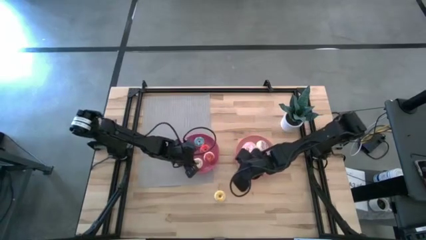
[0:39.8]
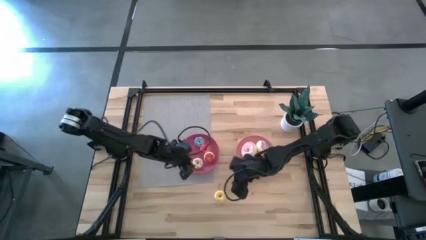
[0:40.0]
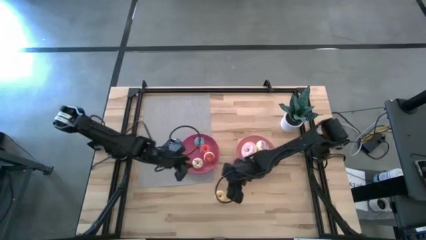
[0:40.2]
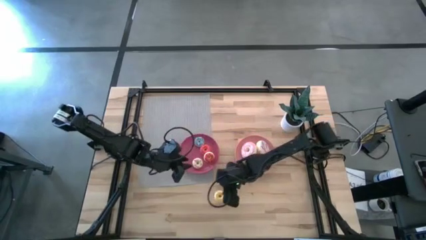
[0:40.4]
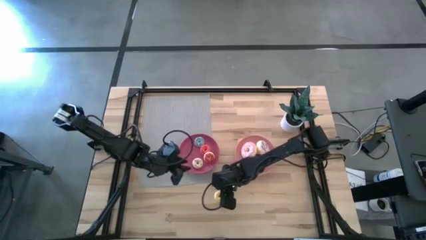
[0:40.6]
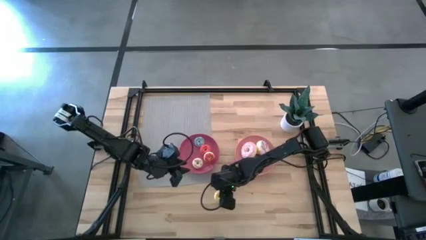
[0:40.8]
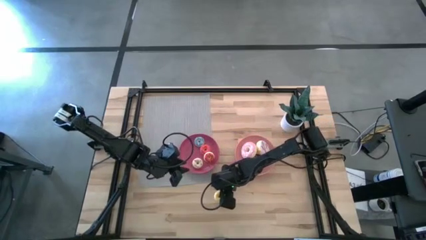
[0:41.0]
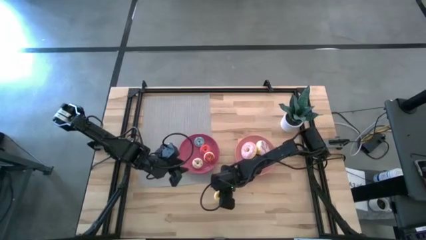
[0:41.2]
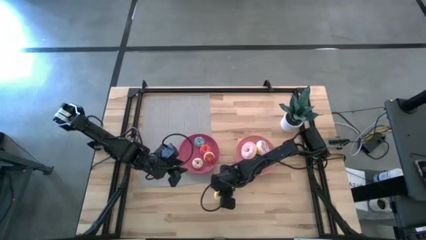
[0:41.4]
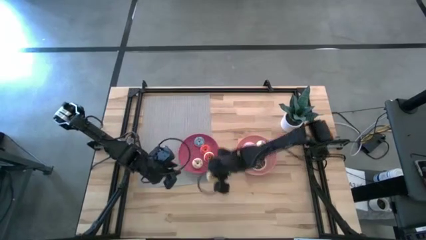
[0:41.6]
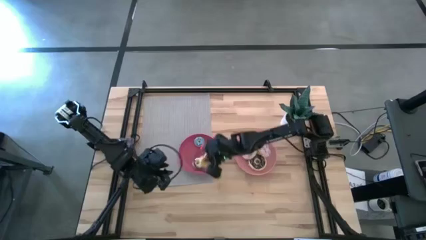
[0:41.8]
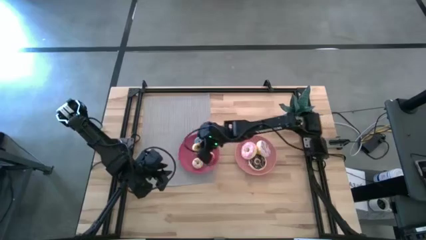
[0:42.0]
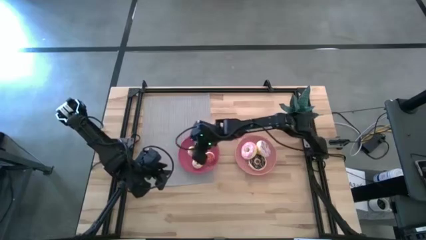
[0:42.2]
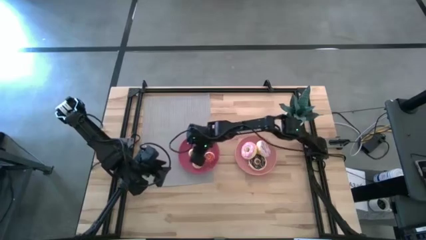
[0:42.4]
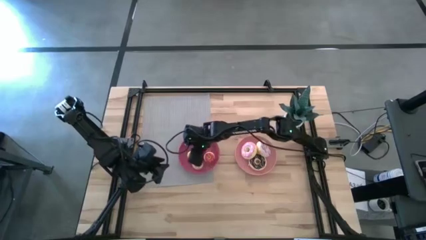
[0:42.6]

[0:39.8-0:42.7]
Task: Pick & Place donuts
Put the small yellow doughnut into the pink plate

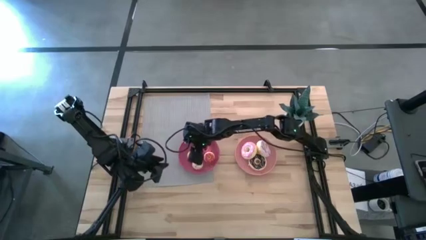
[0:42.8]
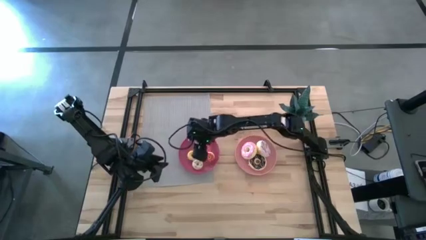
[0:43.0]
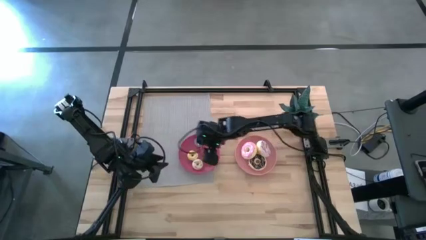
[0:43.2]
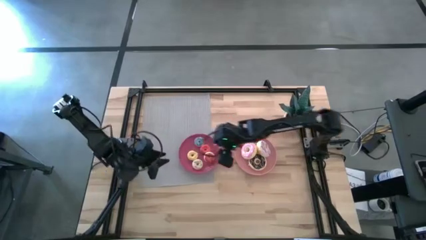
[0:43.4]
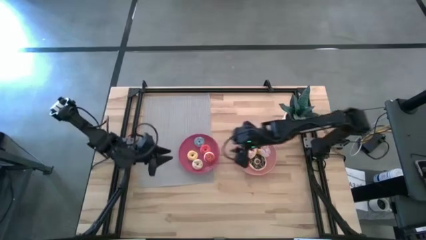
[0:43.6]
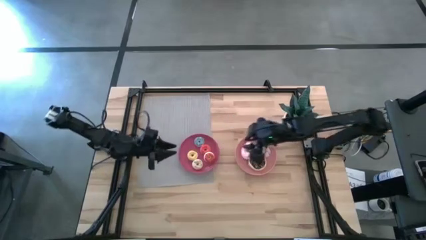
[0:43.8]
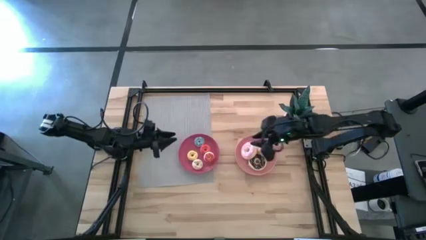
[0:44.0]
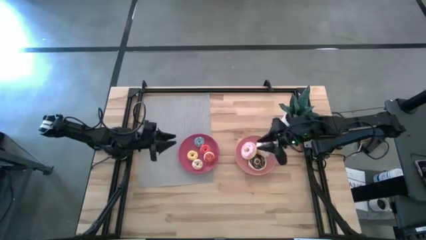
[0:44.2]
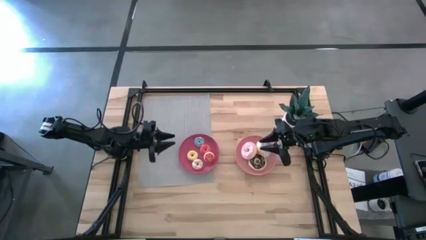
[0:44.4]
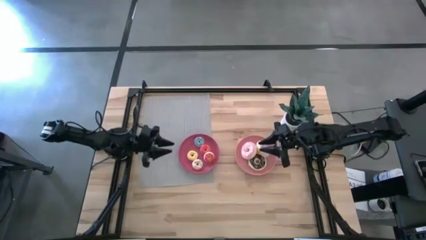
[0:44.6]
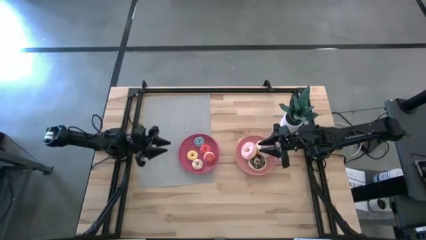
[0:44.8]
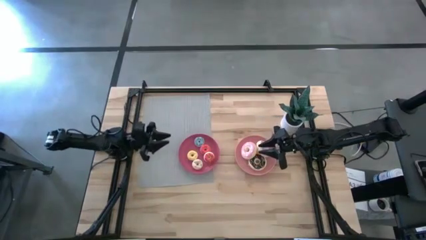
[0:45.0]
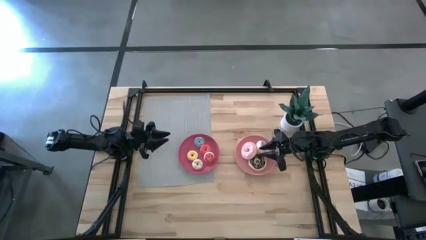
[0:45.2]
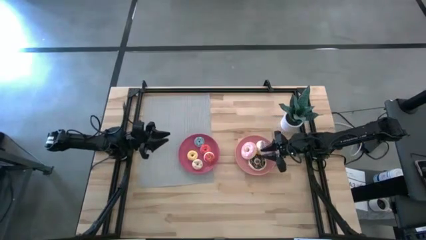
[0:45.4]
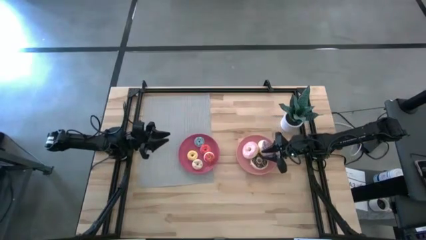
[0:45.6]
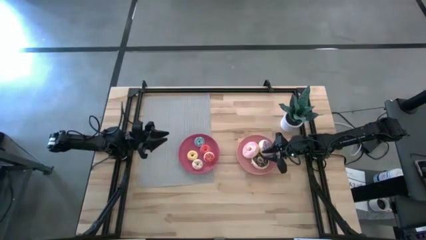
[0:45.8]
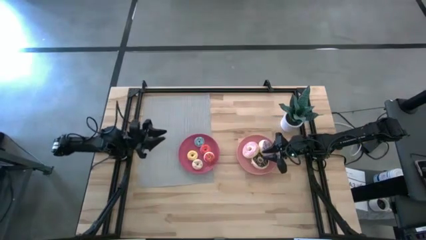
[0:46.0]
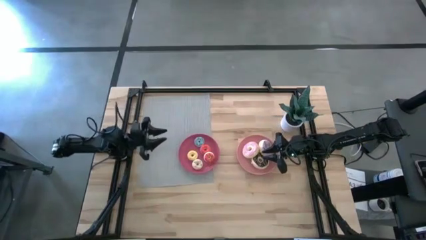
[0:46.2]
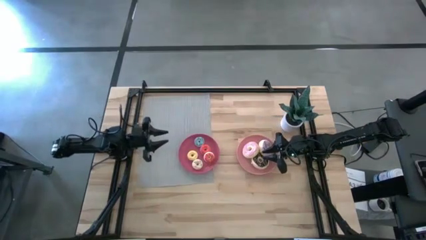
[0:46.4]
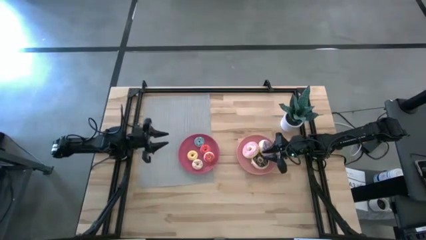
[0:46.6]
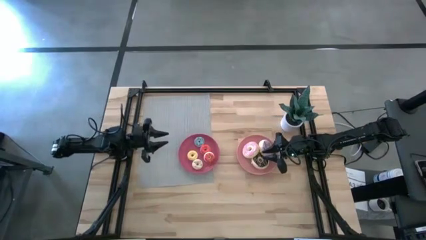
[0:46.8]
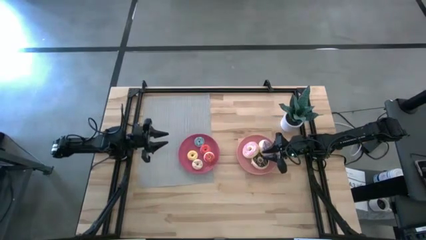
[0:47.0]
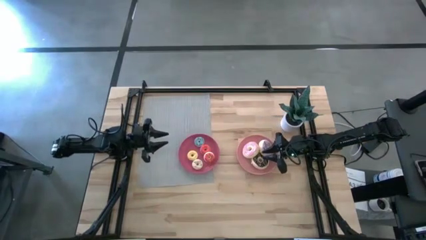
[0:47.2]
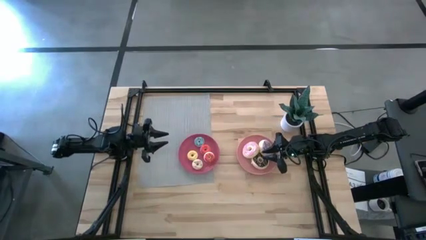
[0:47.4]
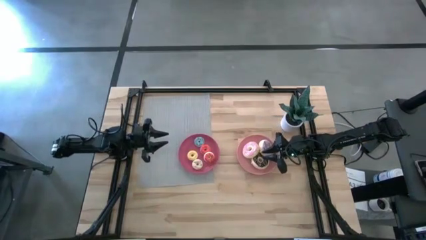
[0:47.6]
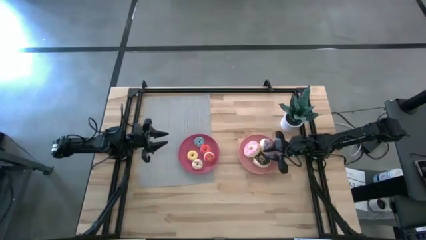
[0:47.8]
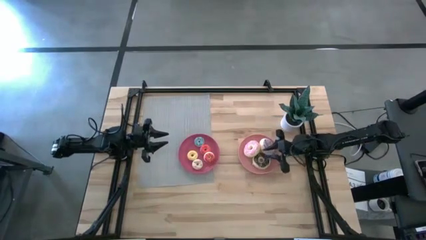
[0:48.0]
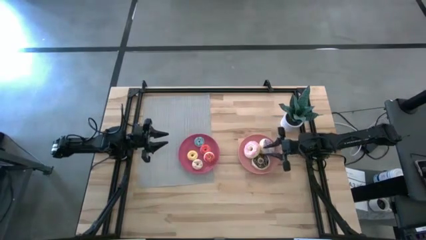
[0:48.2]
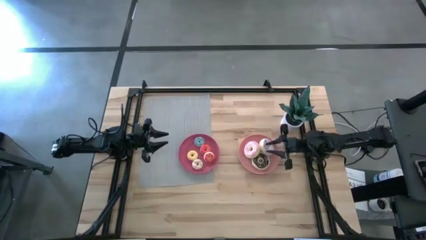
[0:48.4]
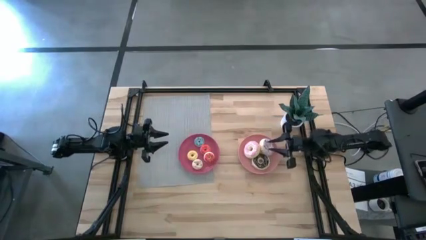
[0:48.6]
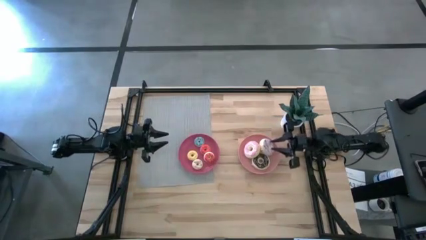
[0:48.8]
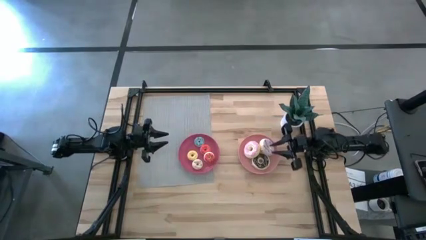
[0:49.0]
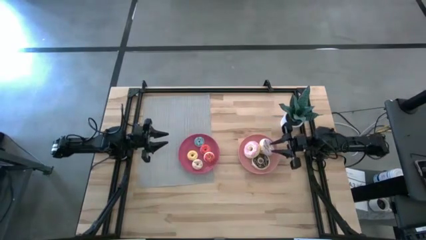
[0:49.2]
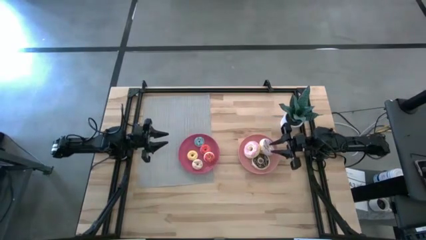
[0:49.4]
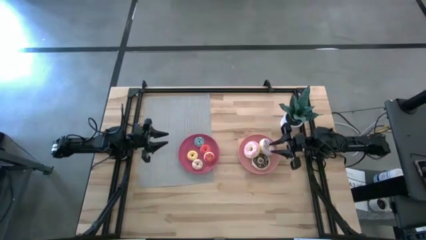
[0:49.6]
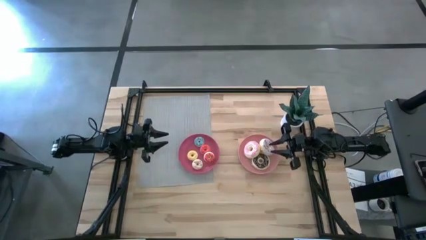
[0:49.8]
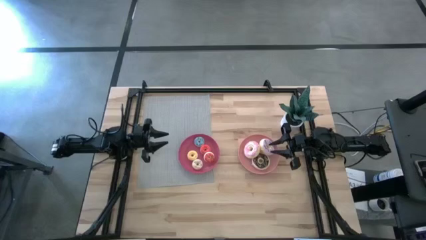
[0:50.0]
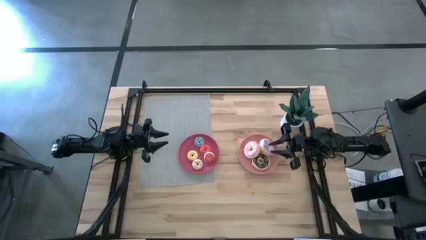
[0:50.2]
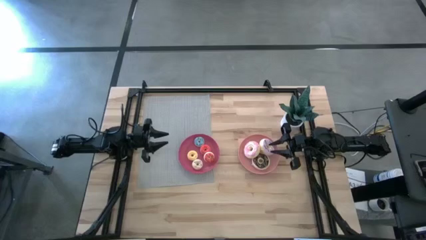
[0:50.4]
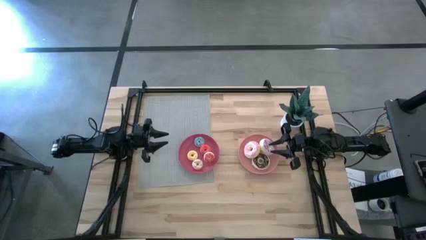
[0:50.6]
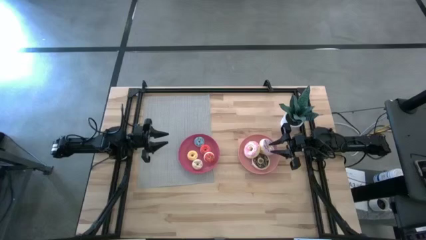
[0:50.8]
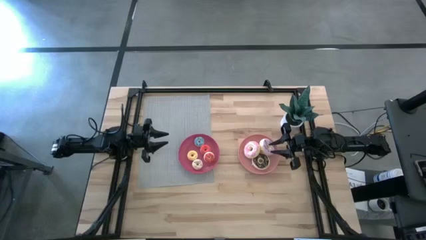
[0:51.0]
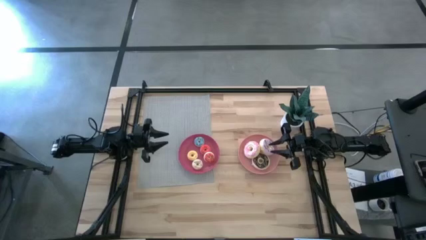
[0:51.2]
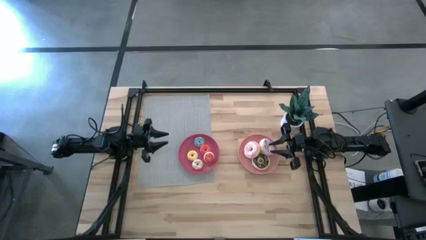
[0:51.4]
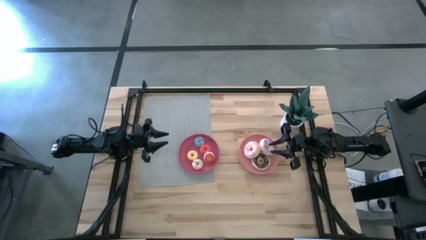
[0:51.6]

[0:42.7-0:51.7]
Return to Home Position

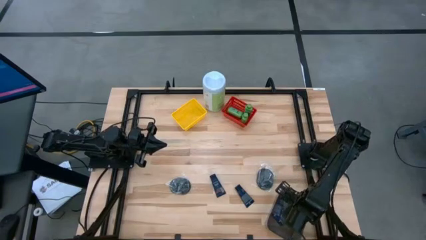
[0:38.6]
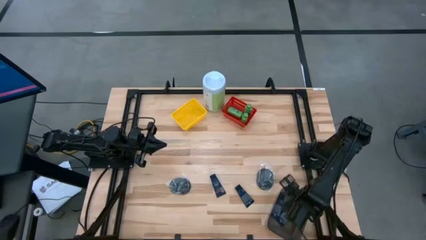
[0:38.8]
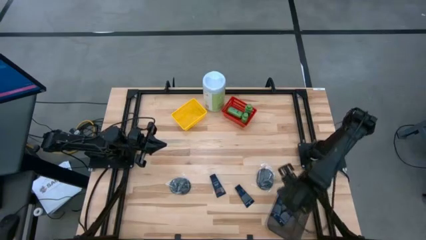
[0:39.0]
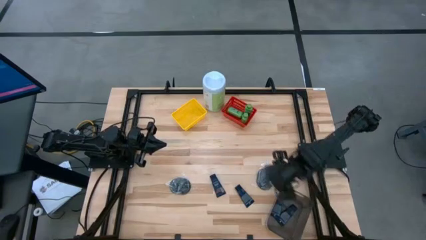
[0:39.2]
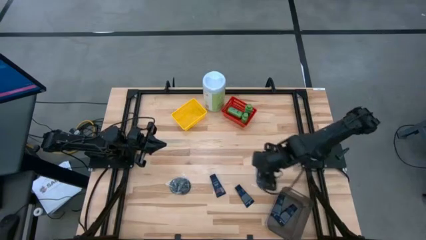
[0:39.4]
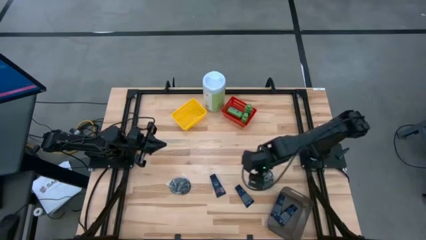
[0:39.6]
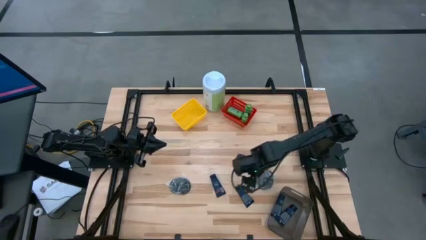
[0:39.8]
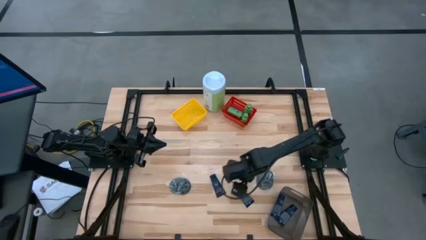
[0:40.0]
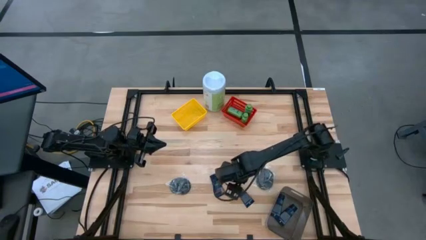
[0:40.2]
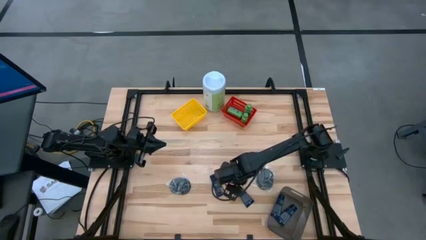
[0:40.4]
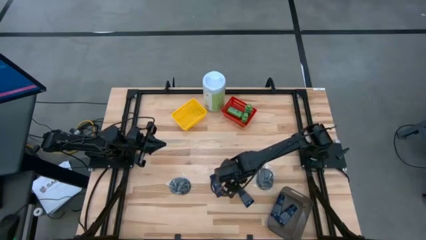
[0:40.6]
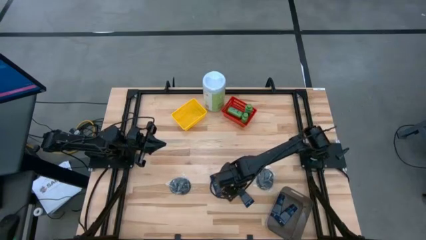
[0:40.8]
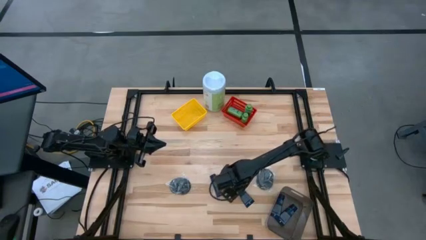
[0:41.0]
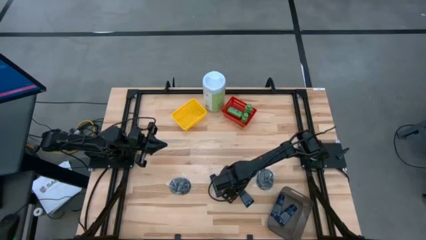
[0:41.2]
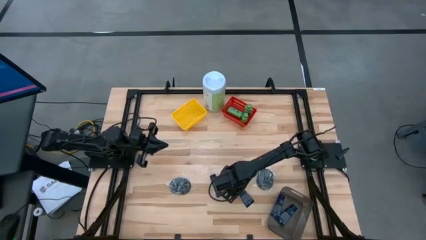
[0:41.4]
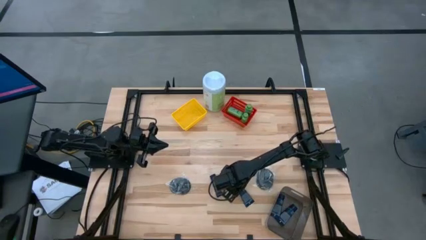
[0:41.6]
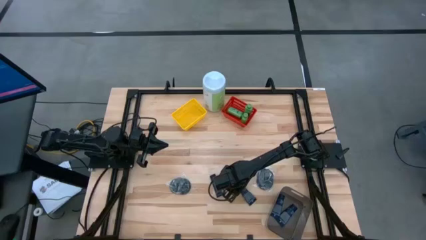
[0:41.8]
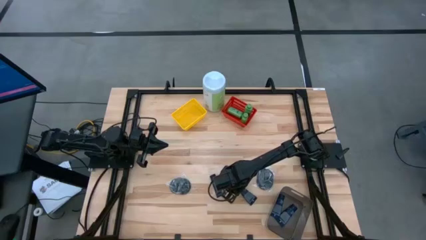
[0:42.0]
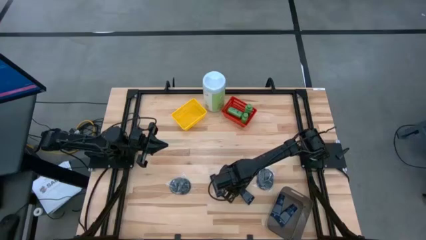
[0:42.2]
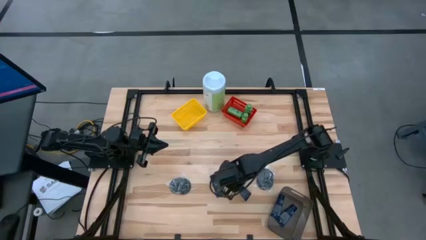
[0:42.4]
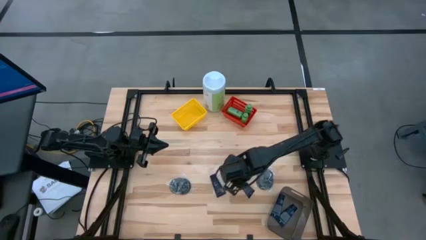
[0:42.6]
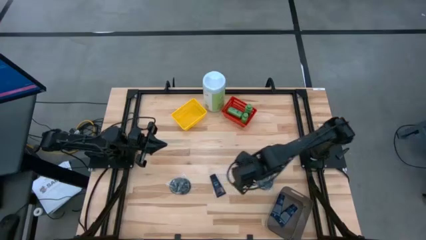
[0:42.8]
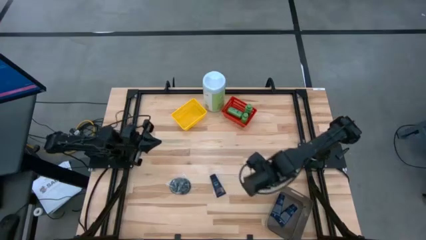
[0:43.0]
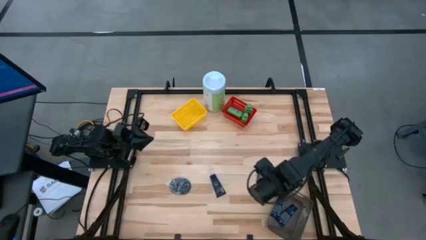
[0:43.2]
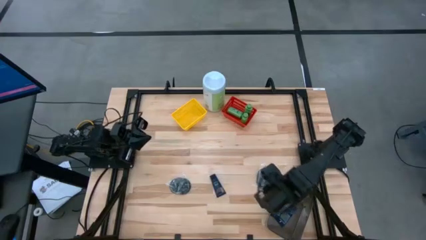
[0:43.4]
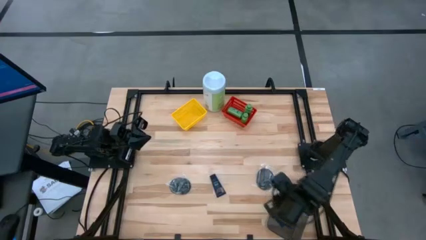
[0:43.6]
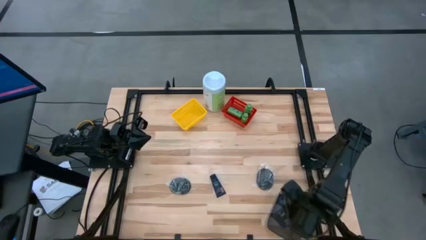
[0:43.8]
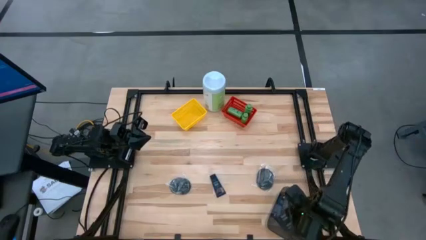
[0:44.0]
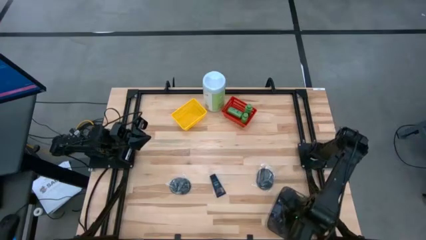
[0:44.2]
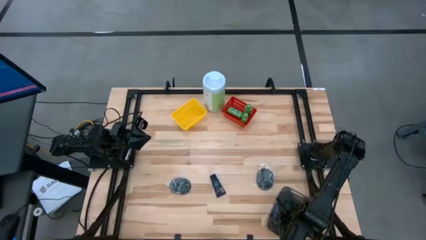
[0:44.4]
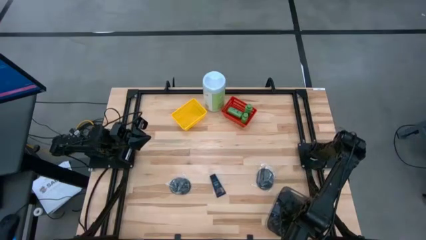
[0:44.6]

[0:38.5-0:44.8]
Task: Pick & Place Travel size toiletries
Put the dark blue shave cream in the black bin
